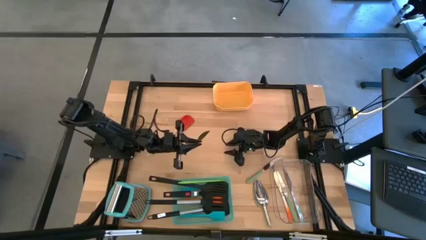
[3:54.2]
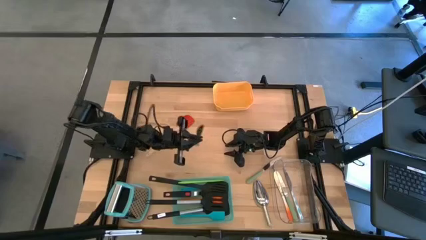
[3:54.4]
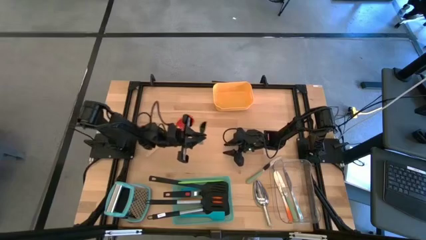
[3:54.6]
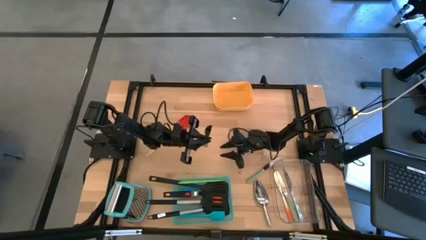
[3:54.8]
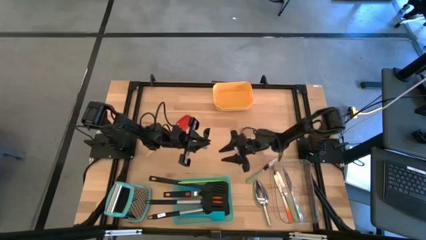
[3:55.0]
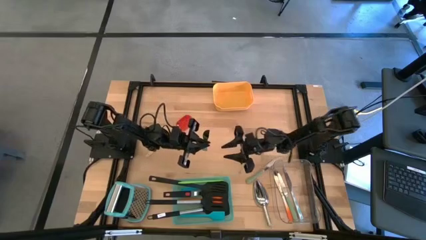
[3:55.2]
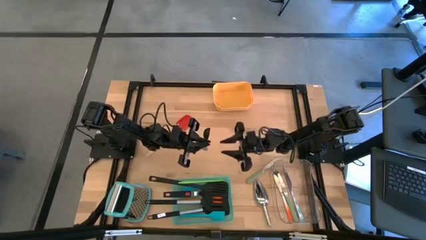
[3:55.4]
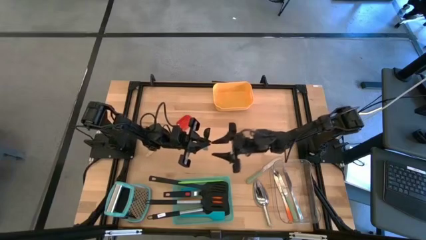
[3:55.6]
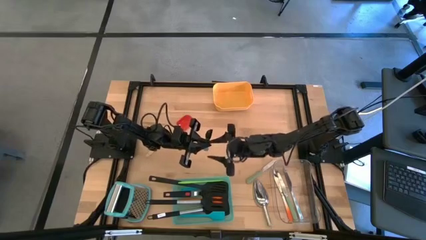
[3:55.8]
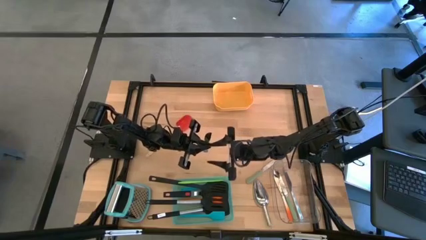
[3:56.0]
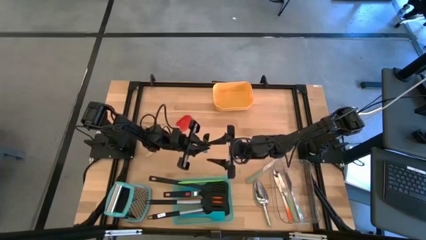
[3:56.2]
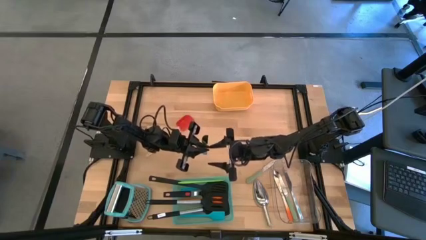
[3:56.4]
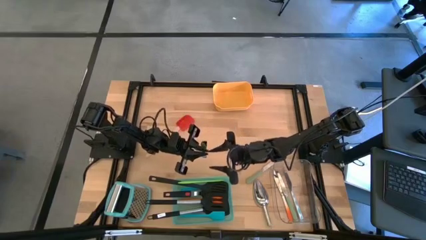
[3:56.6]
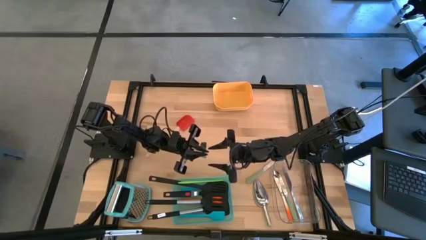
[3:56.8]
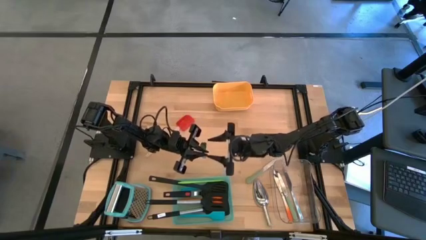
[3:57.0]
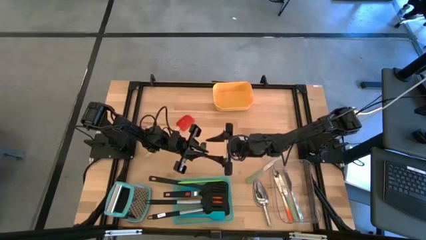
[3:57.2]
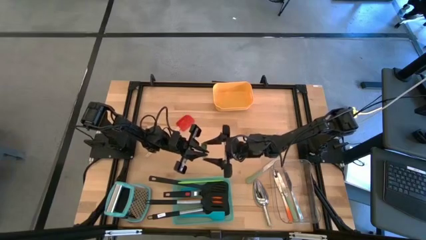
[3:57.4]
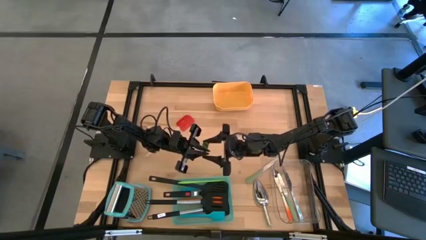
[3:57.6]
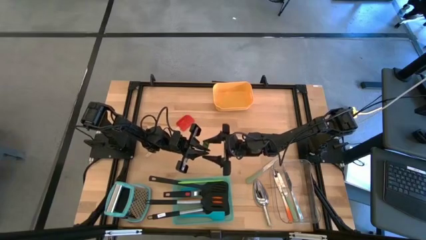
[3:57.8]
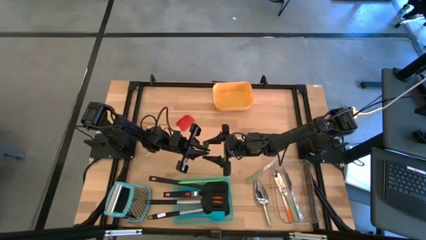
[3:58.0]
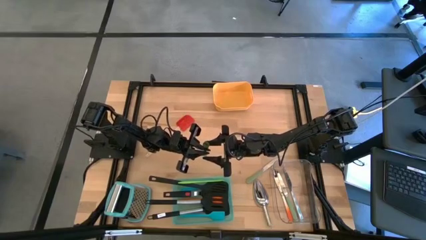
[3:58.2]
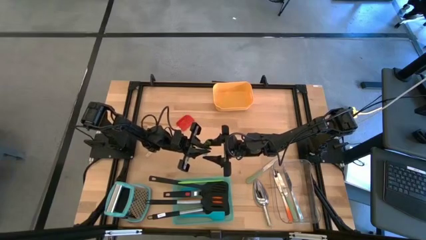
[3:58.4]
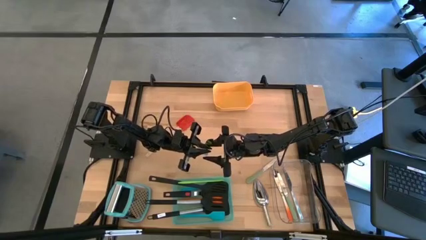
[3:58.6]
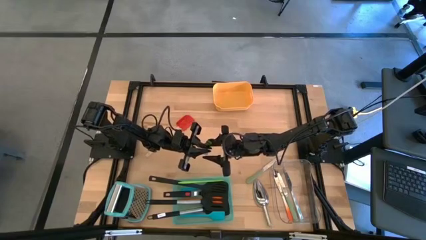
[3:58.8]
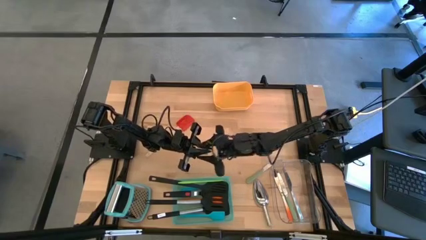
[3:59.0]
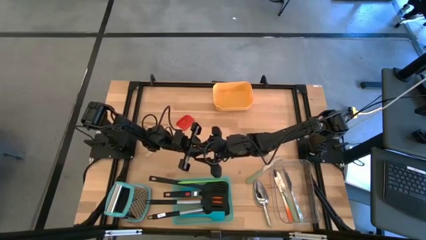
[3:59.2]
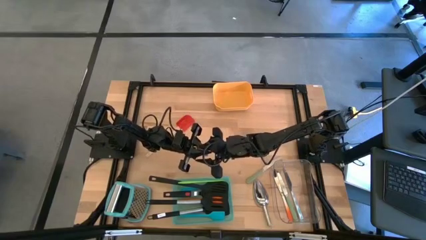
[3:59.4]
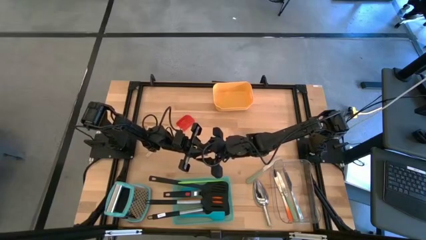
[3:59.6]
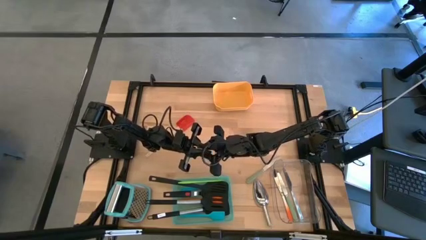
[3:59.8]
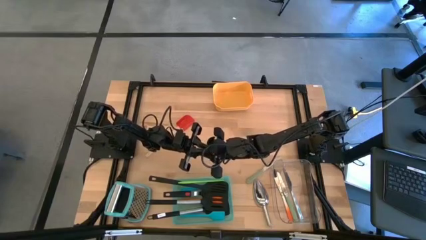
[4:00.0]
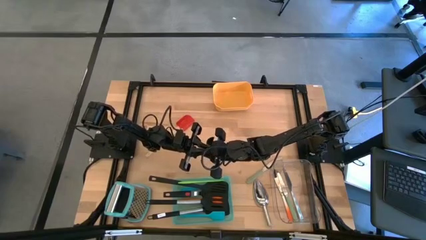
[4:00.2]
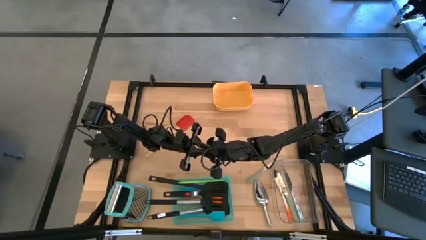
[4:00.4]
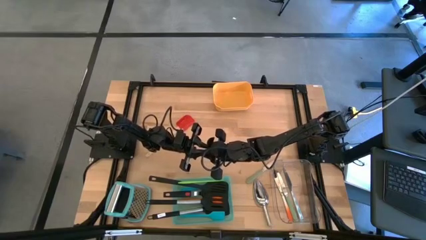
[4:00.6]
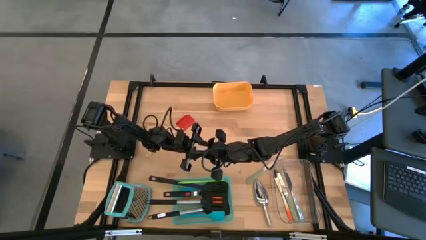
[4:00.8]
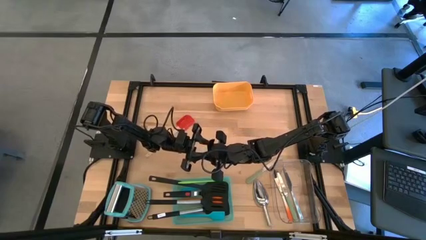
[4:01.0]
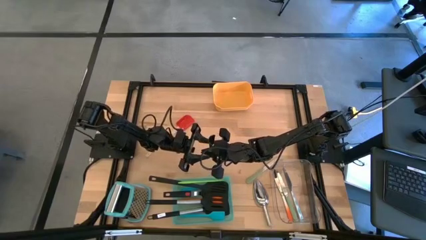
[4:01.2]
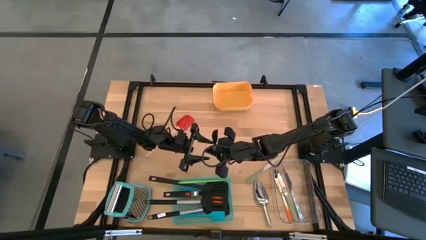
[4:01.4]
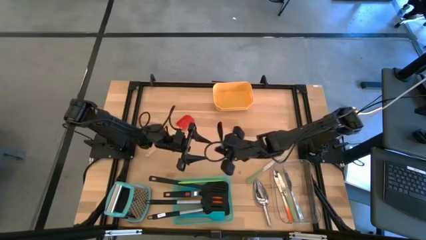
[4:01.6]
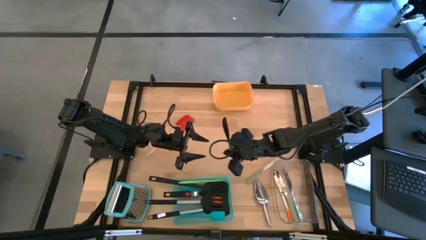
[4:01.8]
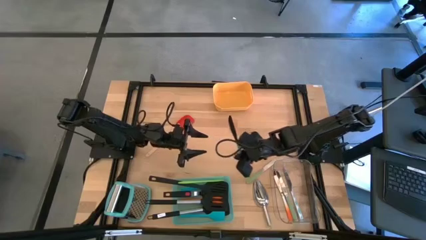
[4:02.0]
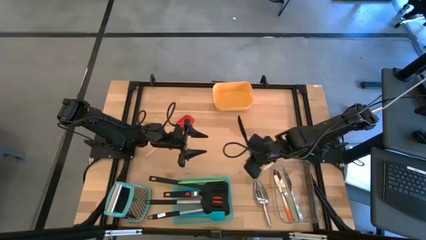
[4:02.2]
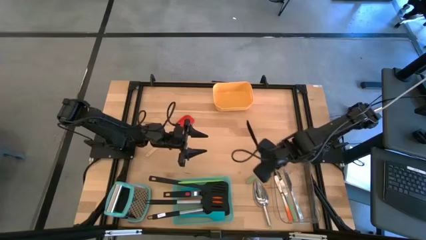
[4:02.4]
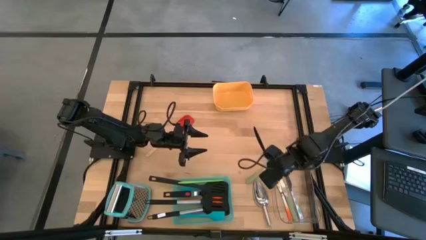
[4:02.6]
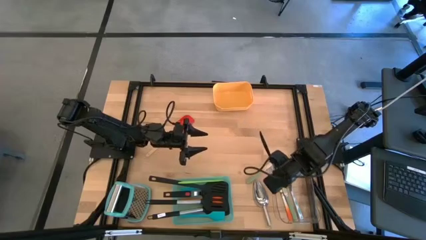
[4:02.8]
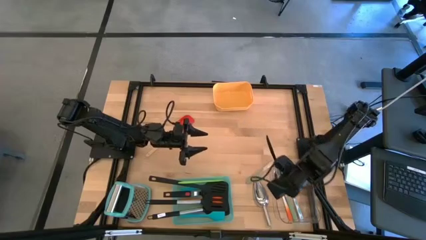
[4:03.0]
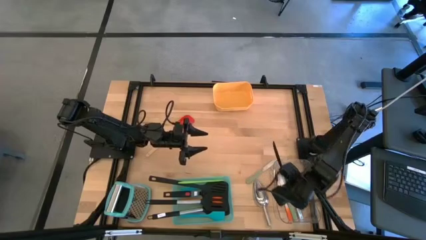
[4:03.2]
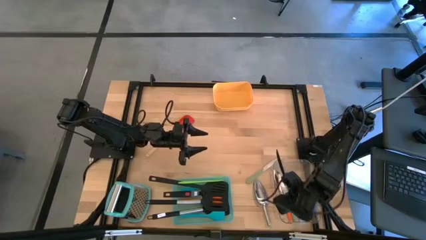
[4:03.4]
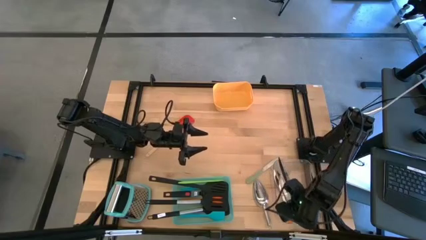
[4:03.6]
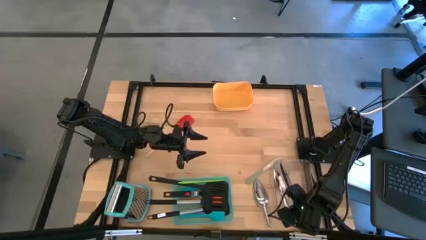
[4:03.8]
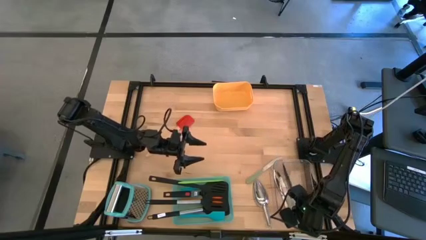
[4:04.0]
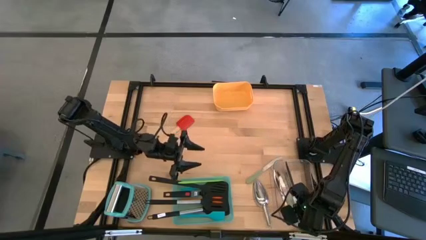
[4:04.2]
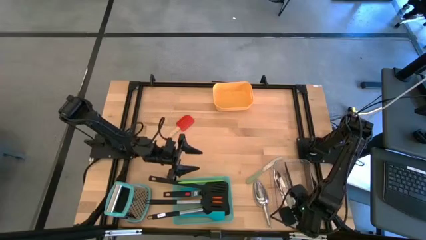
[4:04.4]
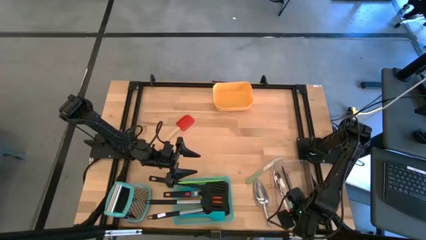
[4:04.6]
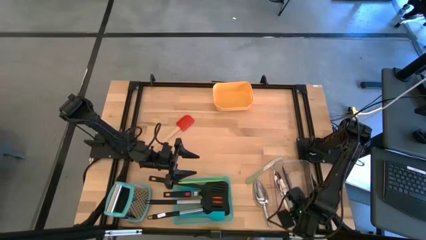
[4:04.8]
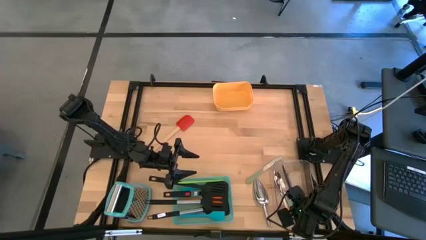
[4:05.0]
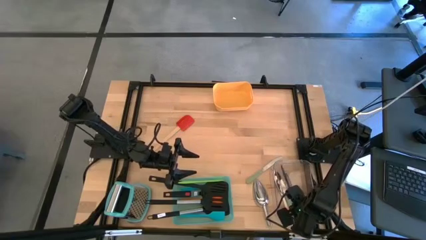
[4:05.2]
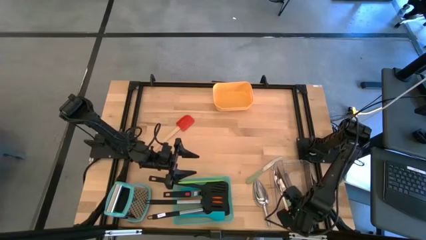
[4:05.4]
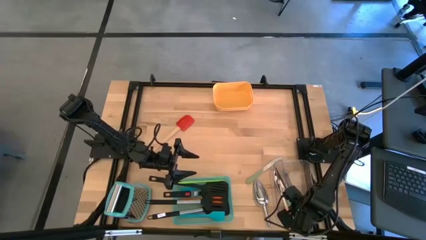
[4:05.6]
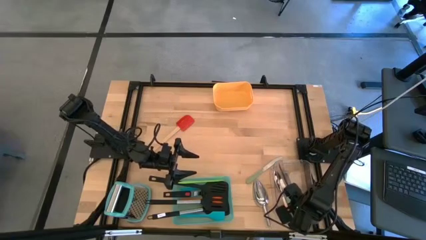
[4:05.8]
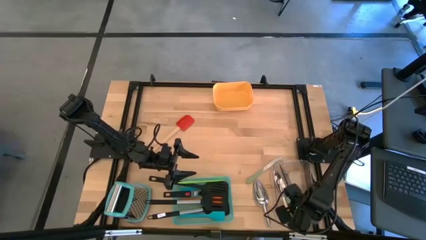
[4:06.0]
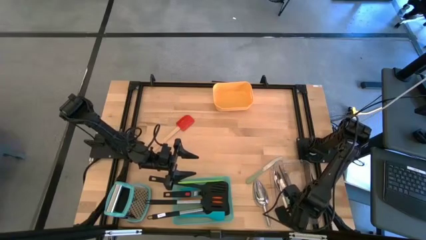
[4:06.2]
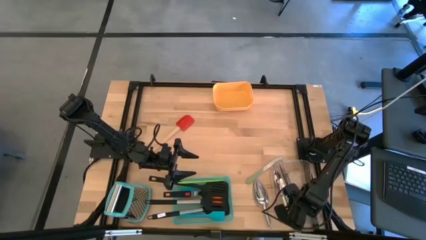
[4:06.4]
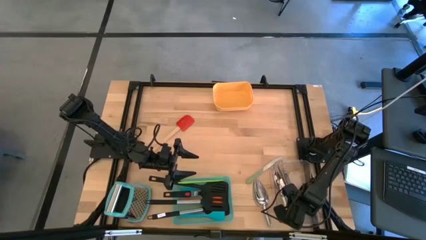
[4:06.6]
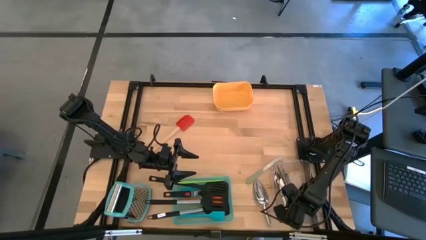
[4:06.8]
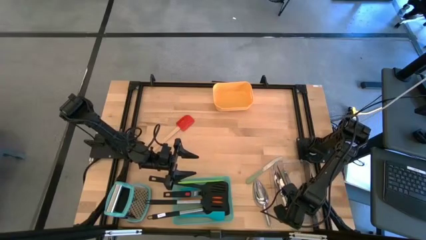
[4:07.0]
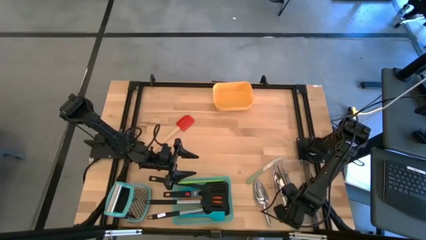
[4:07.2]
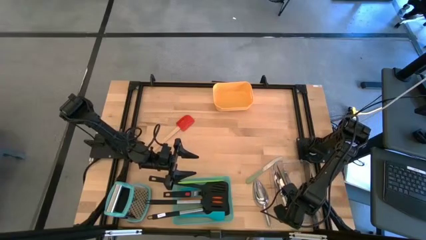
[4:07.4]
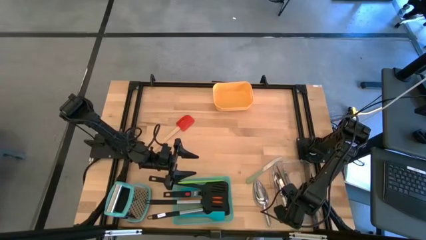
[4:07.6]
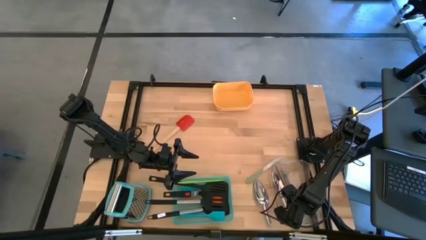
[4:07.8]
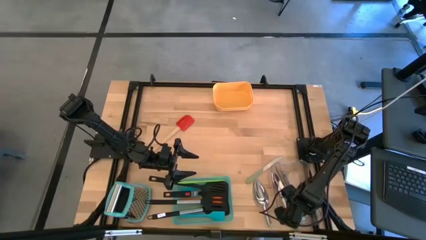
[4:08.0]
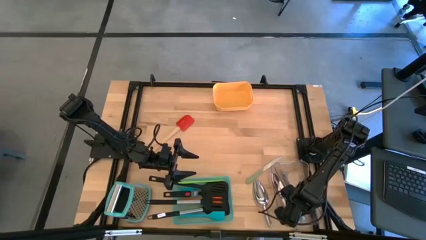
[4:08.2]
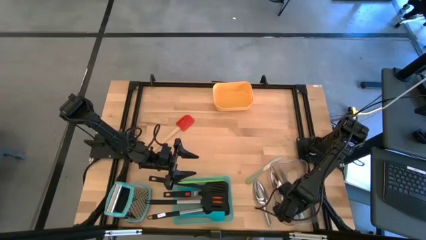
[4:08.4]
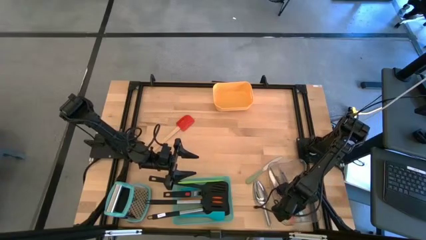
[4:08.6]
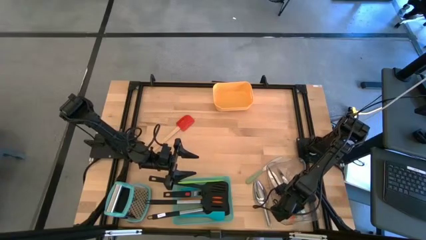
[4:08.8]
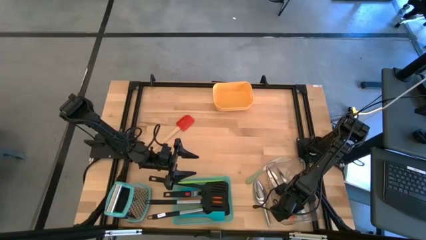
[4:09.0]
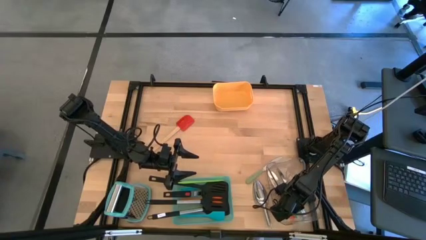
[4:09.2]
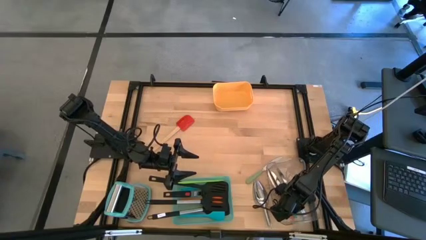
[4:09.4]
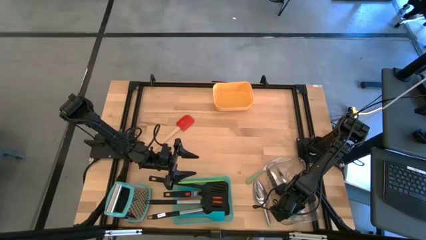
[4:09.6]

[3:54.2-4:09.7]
Task: Pick & Place Kitchen Items
Put the blue table knife into the transparent bin
